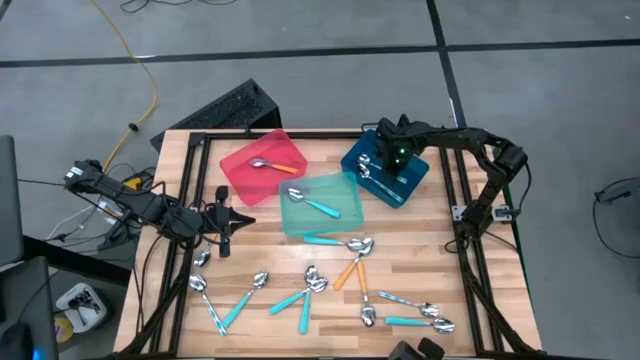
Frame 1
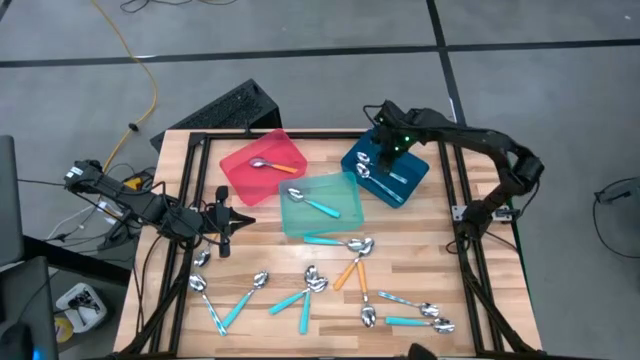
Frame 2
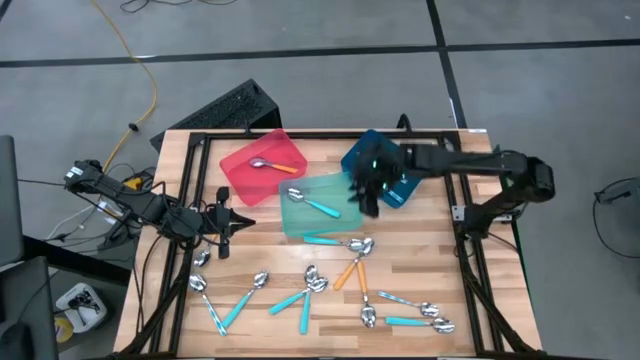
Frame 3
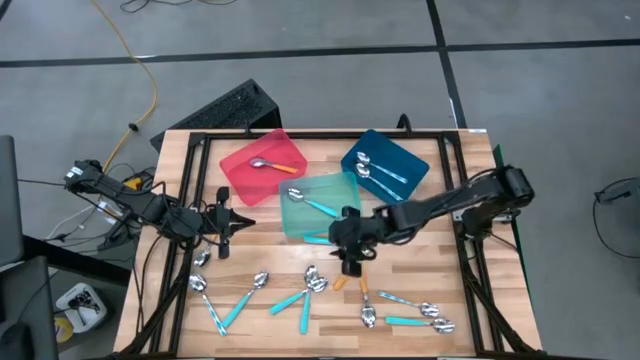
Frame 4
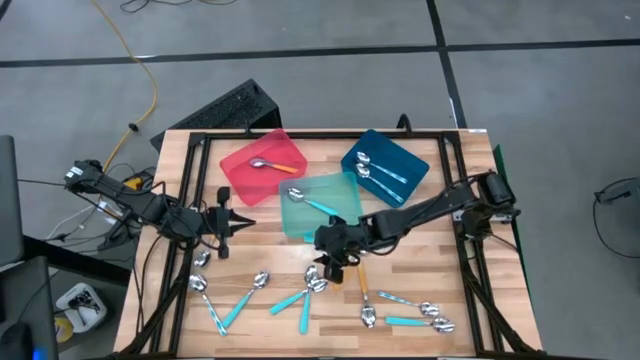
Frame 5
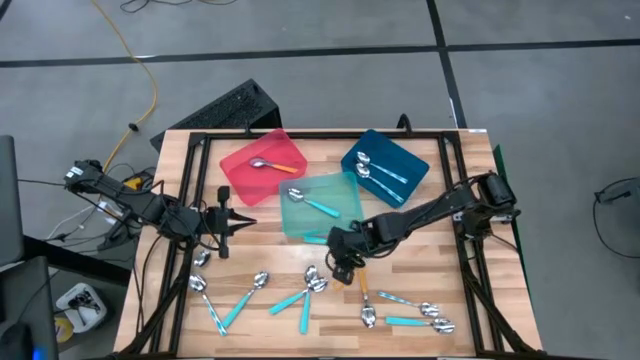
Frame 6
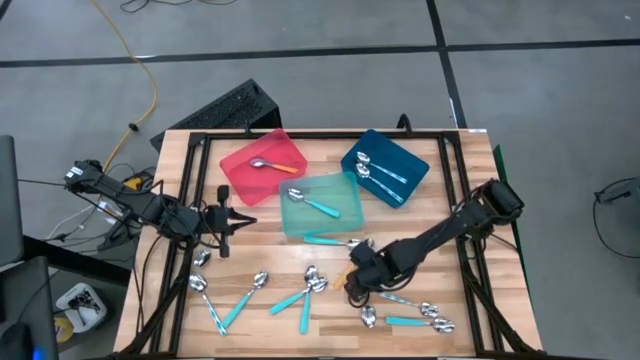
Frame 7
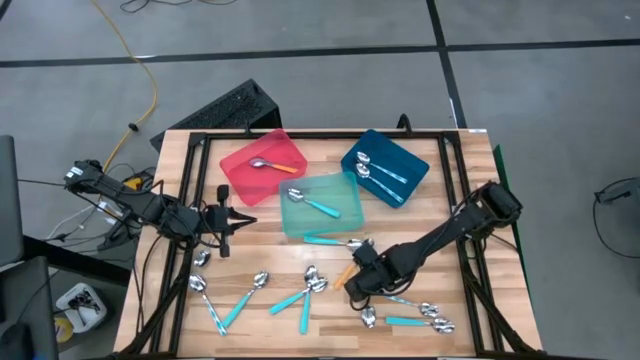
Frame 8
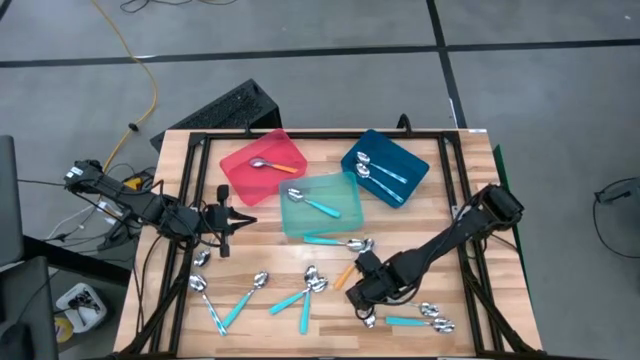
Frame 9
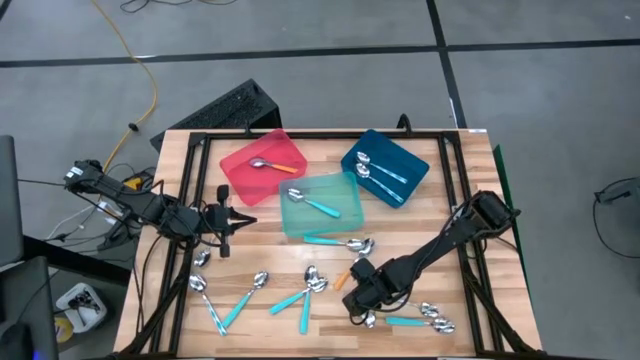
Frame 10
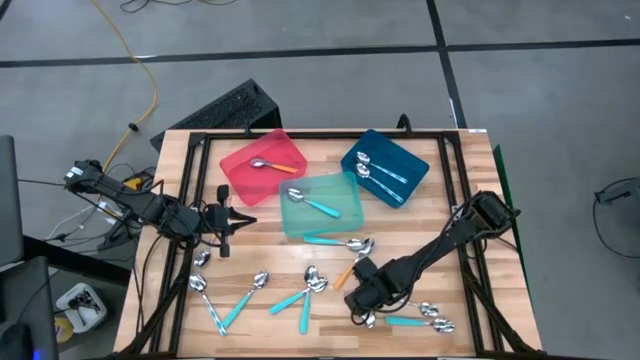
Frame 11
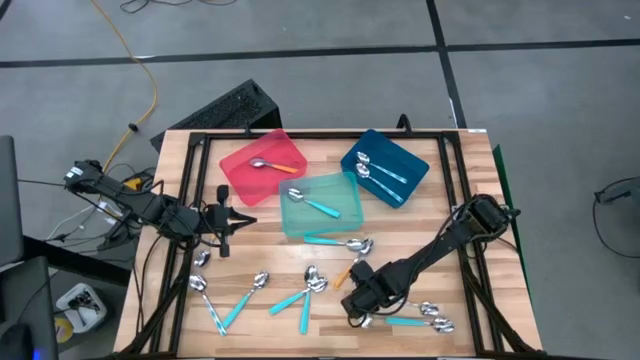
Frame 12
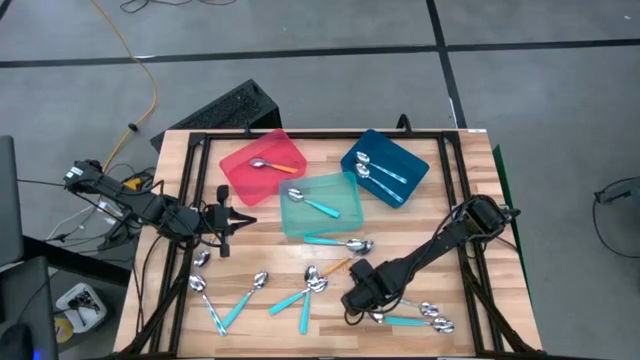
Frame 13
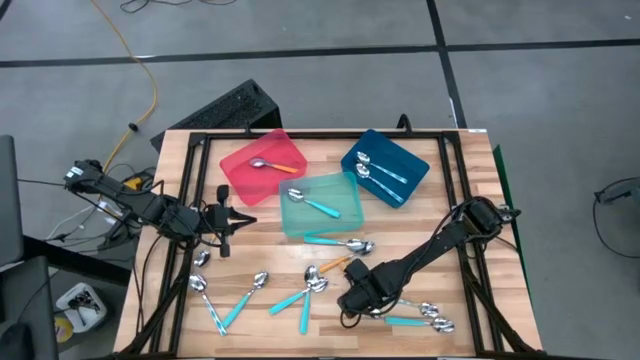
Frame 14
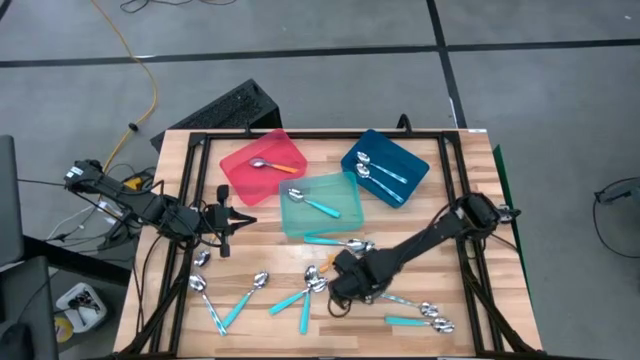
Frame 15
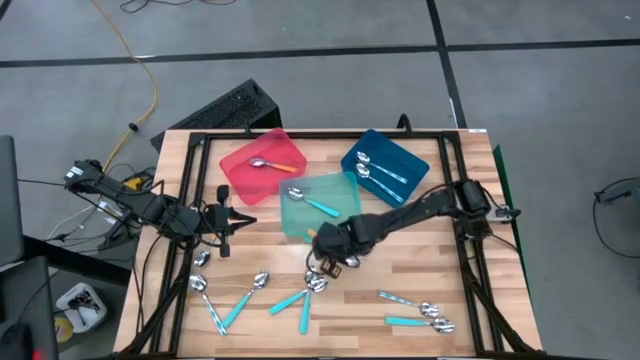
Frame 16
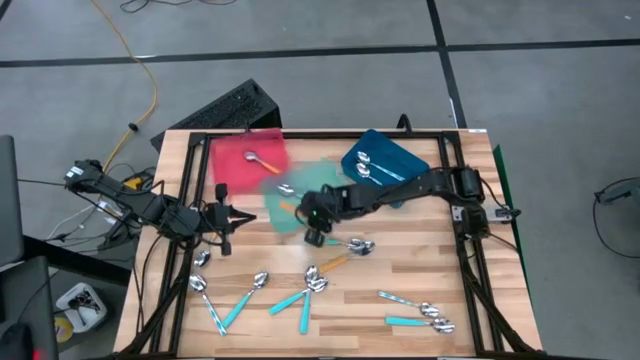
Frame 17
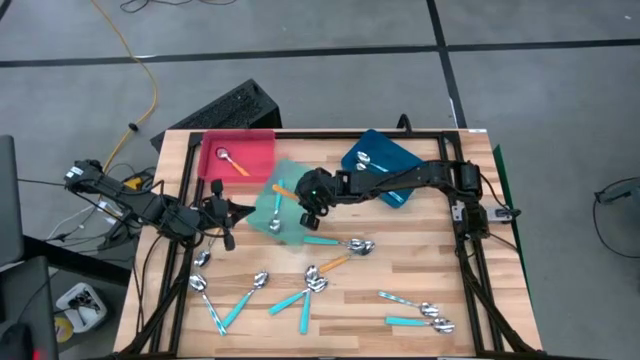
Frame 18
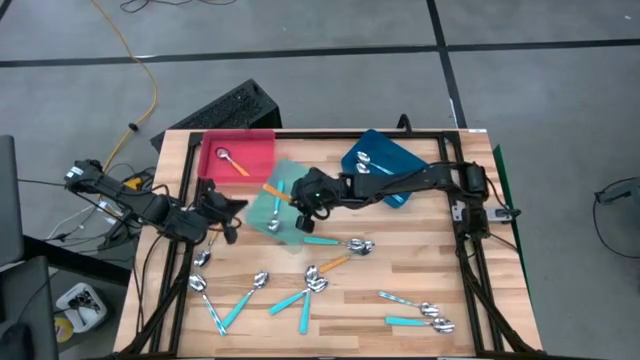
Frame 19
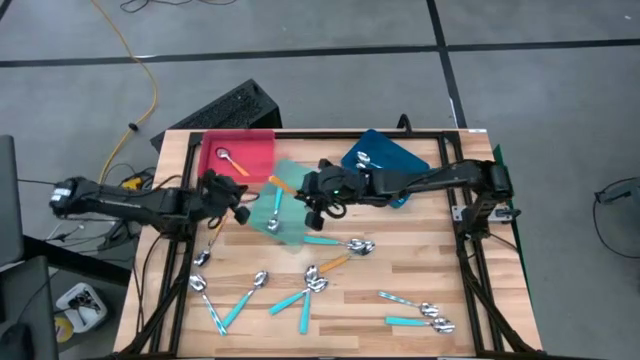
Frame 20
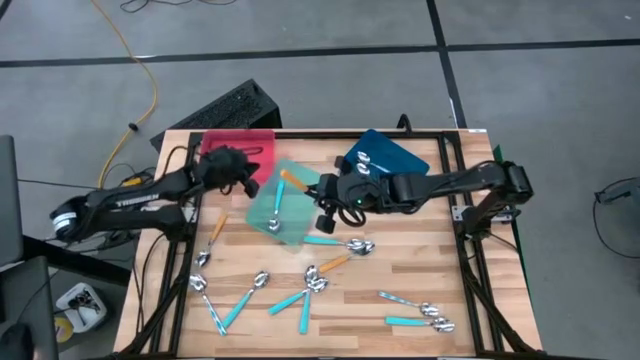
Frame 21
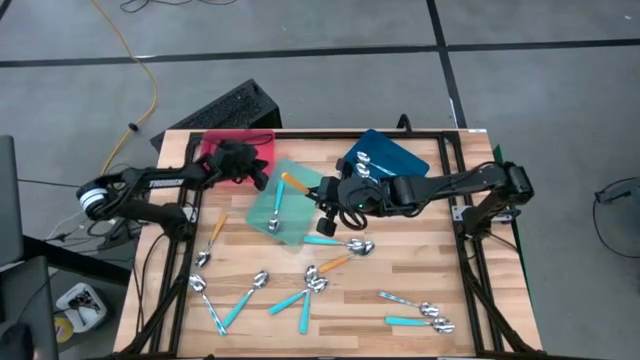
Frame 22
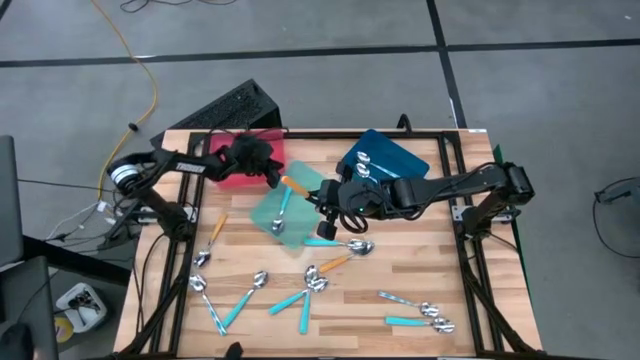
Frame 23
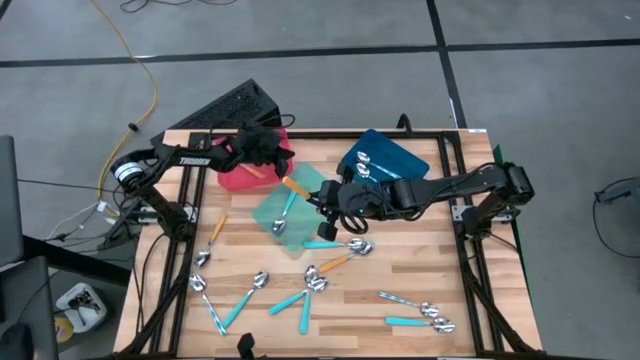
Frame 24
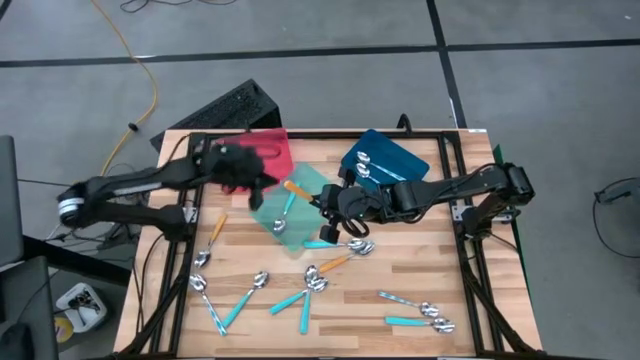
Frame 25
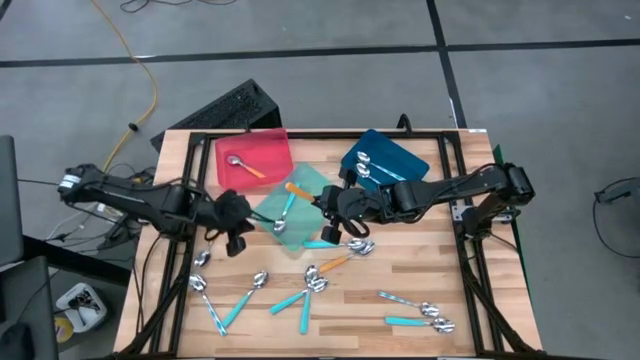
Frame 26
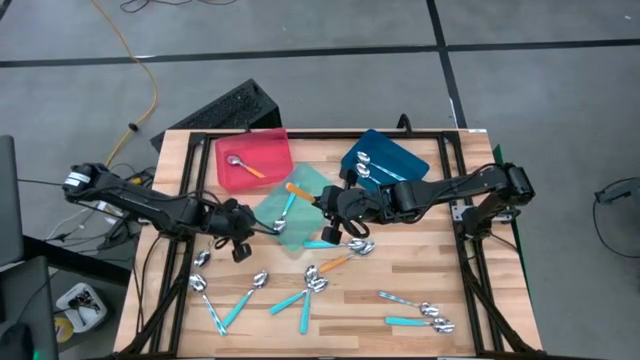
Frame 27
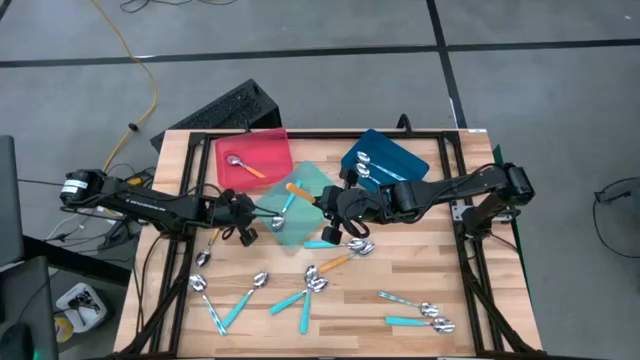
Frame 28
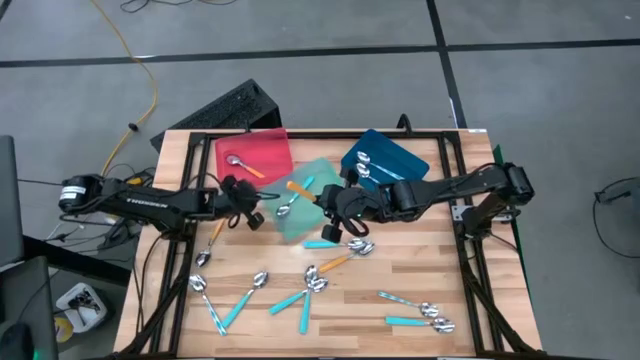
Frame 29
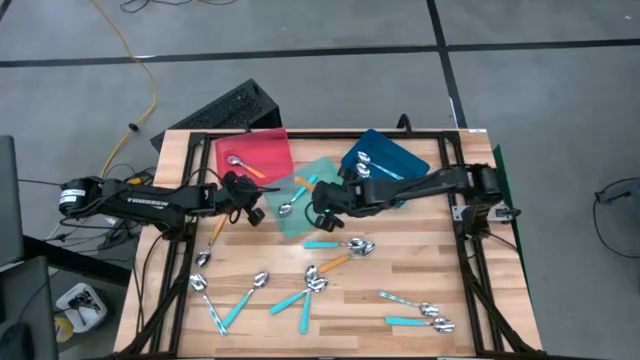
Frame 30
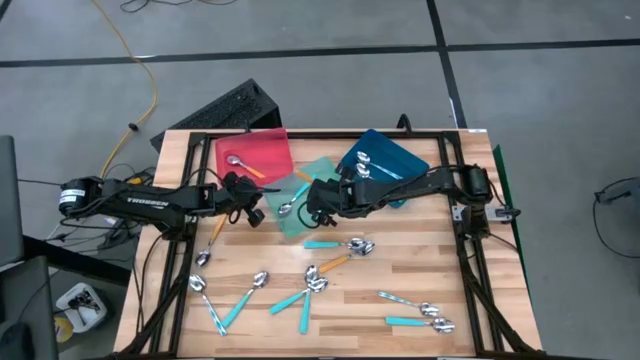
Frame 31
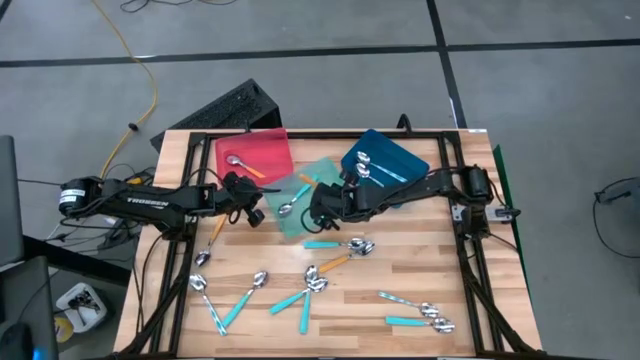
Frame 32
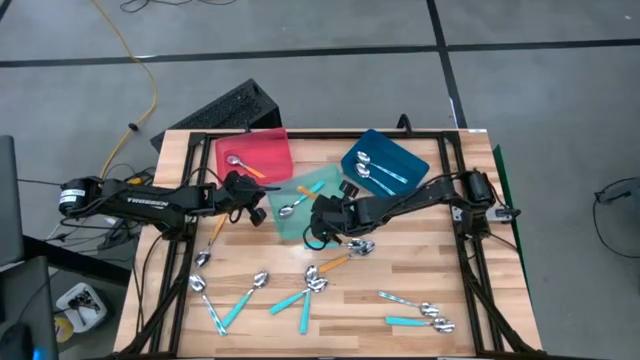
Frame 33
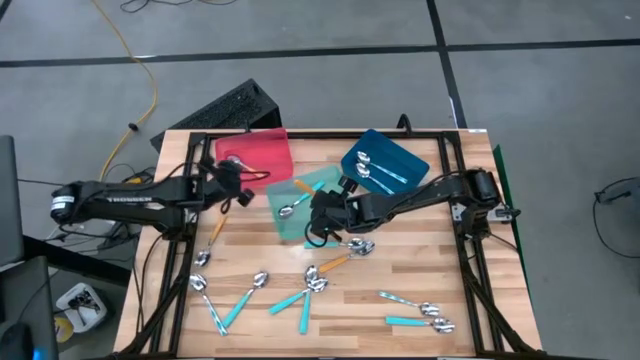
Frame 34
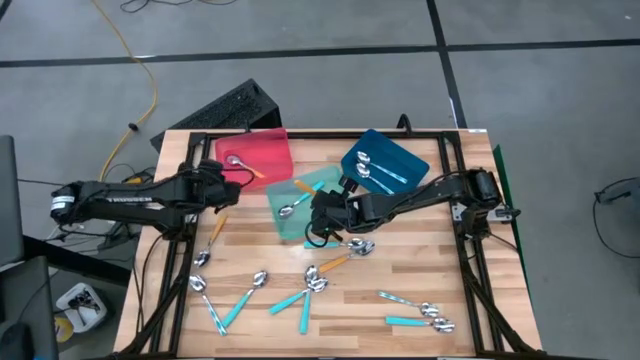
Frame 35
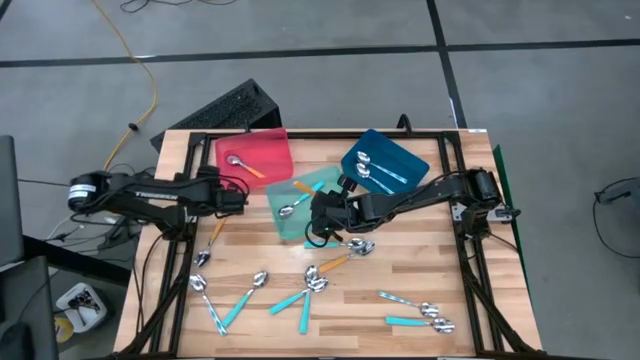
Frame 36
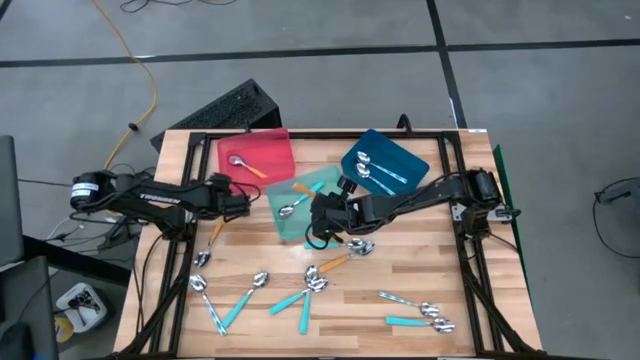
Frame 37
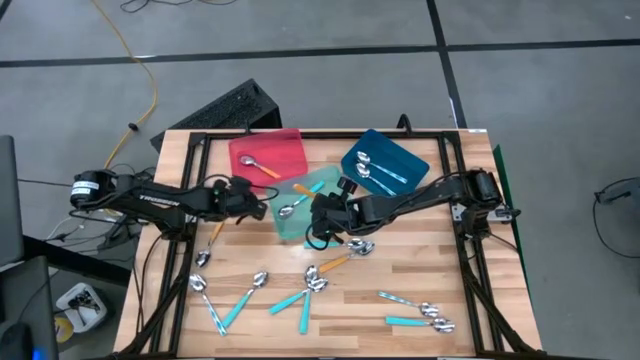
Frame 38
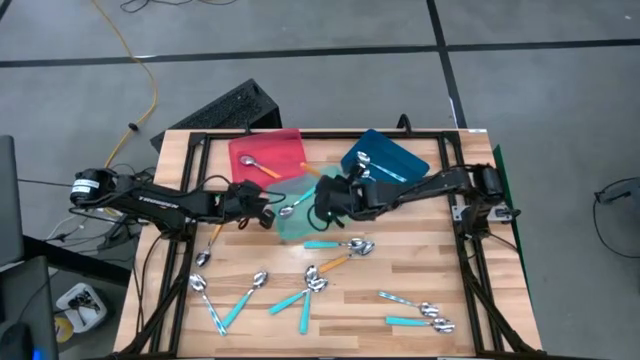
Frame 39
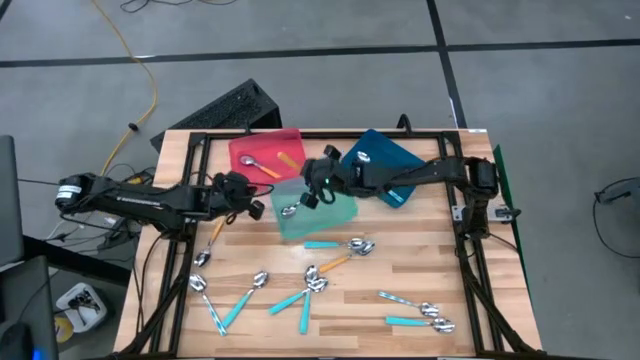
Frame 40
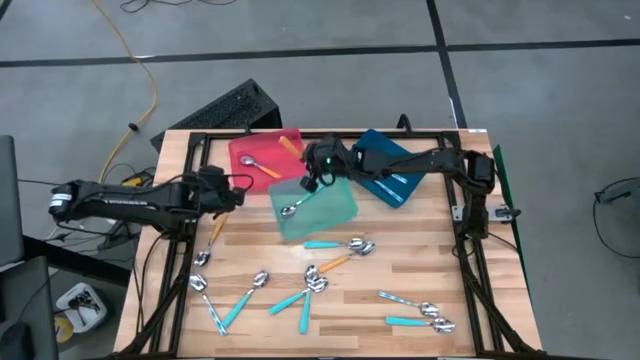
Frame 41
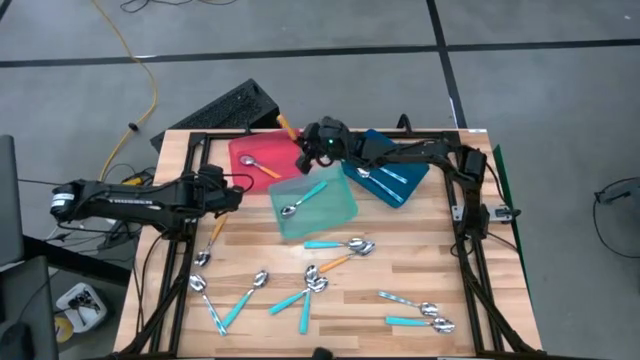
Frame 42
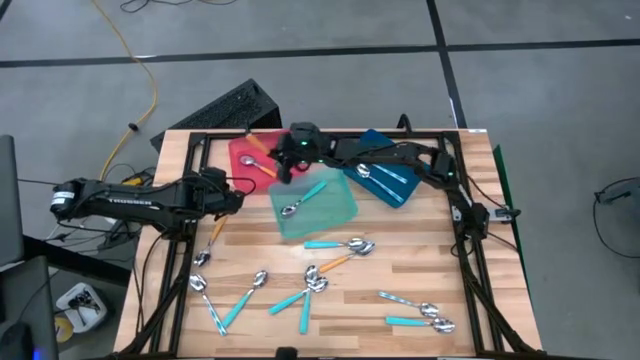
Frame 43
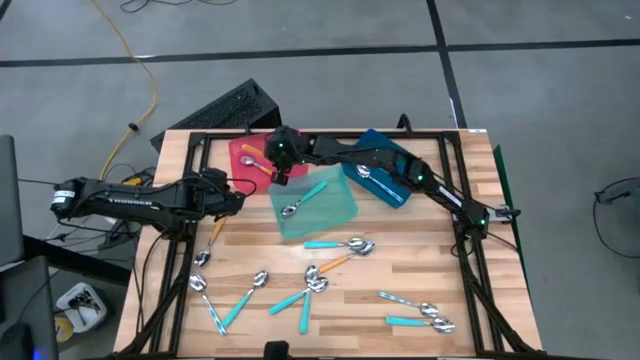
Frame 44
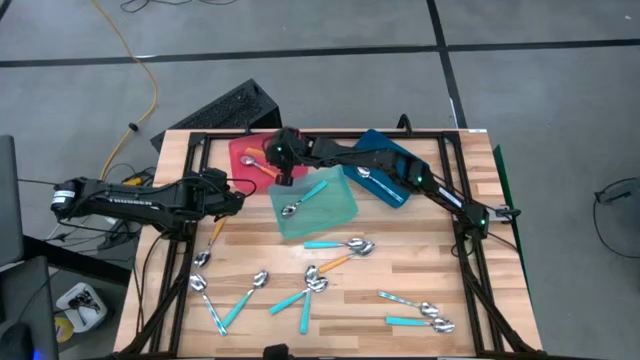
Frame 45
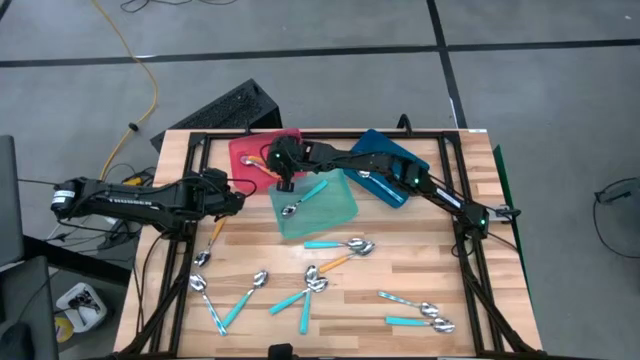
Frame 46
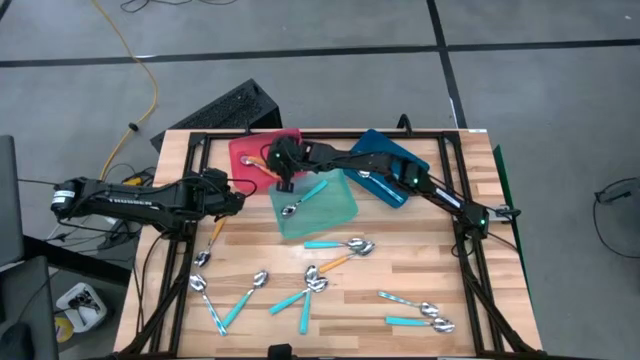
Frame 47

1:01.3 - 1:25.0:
Task: Sort silverware by color (type)
Put the bottom orange spoon into the red bin
